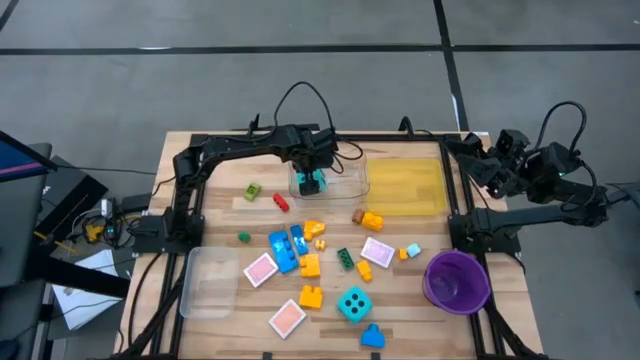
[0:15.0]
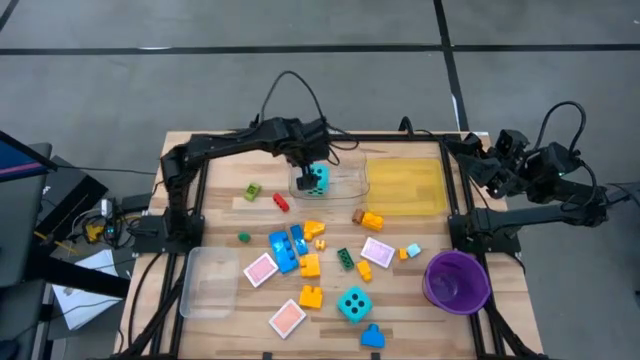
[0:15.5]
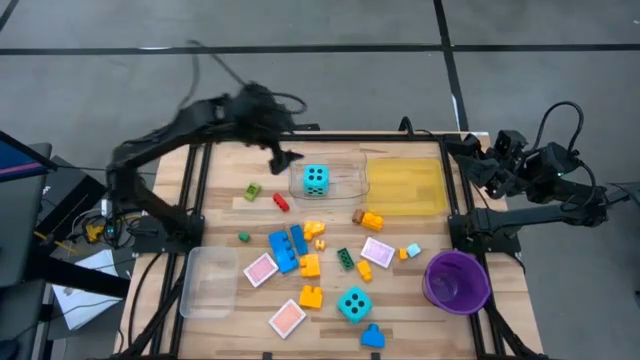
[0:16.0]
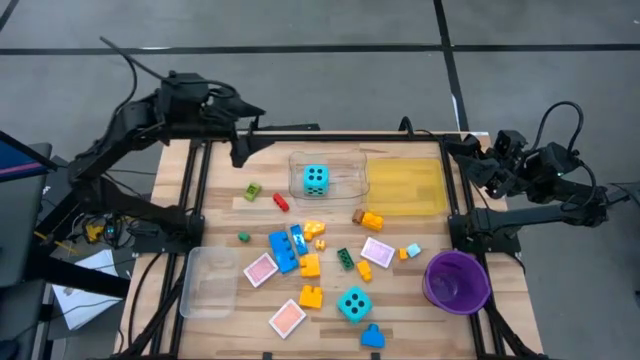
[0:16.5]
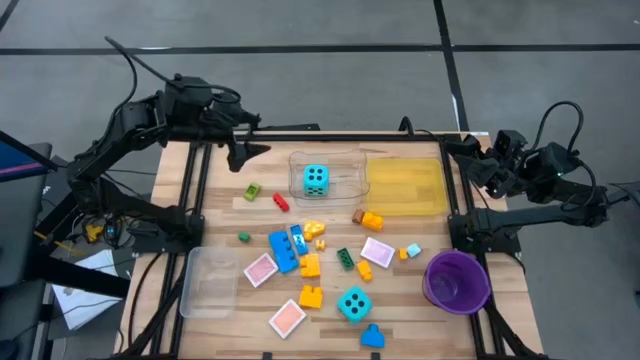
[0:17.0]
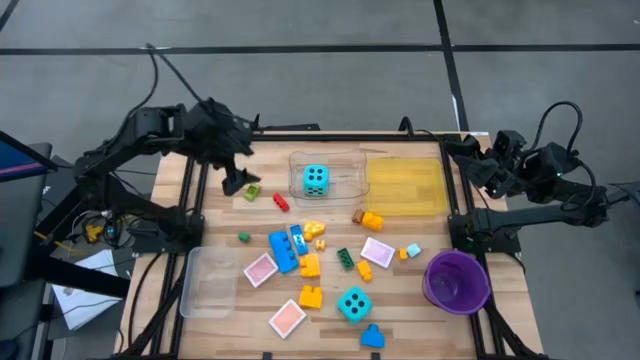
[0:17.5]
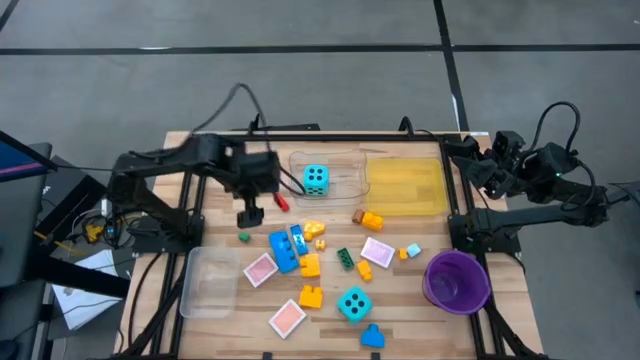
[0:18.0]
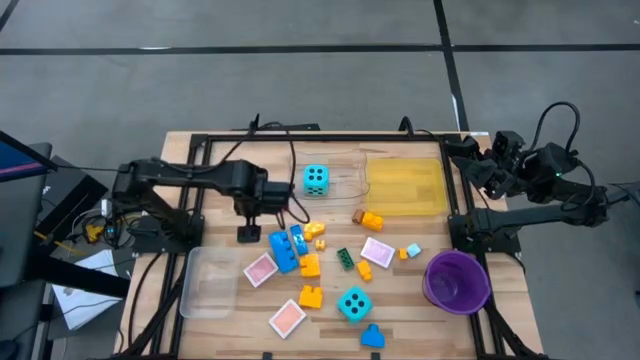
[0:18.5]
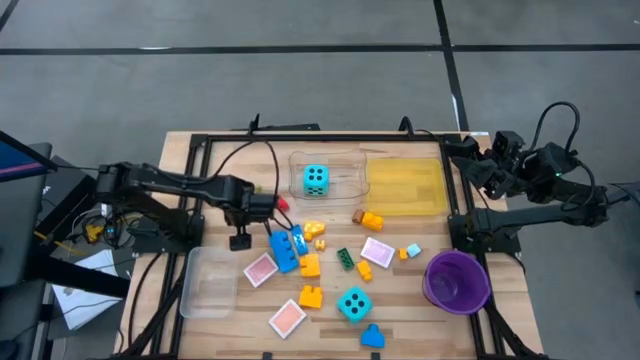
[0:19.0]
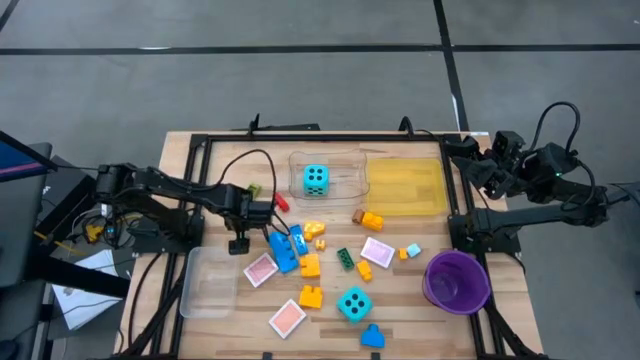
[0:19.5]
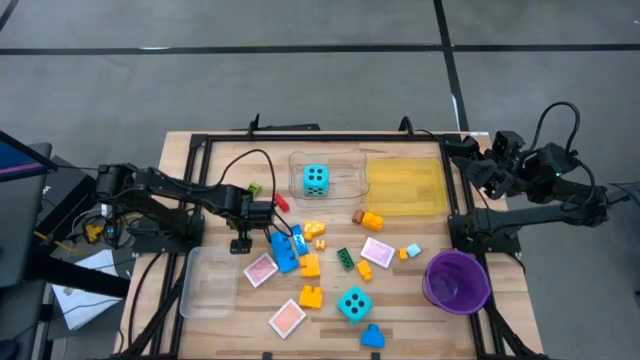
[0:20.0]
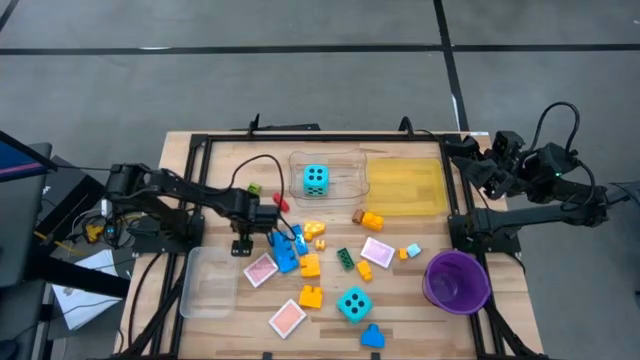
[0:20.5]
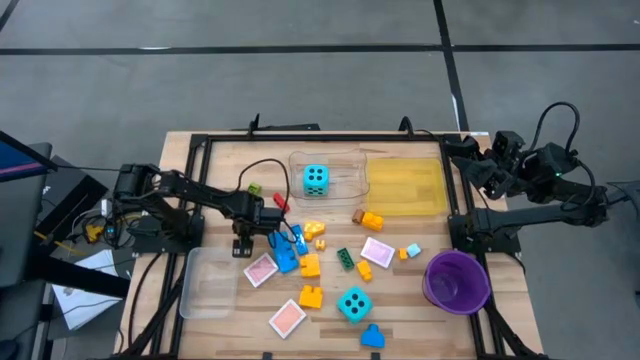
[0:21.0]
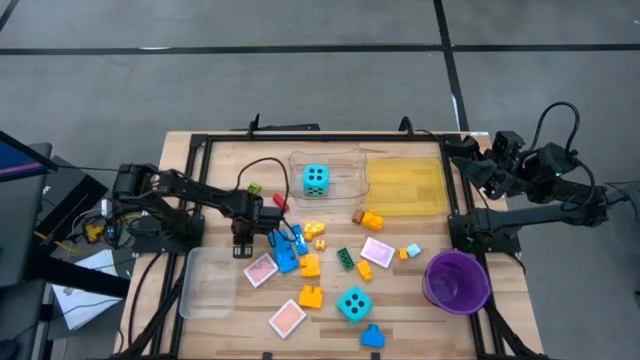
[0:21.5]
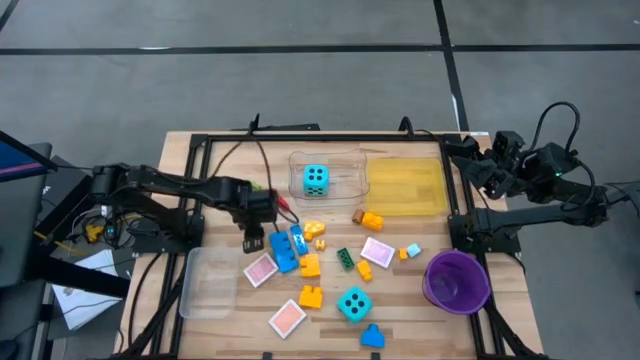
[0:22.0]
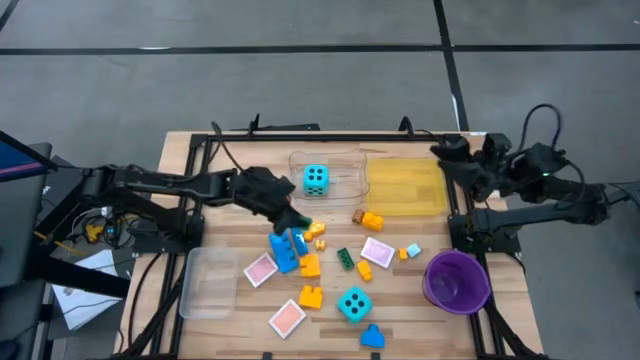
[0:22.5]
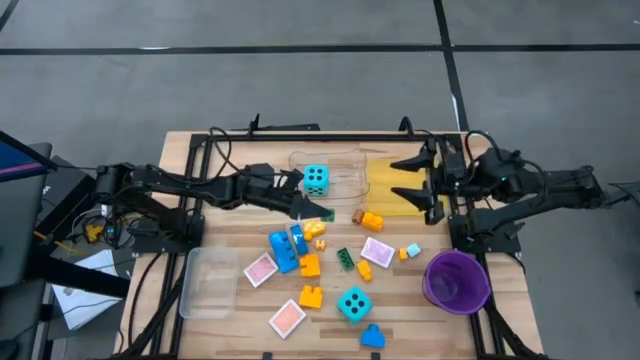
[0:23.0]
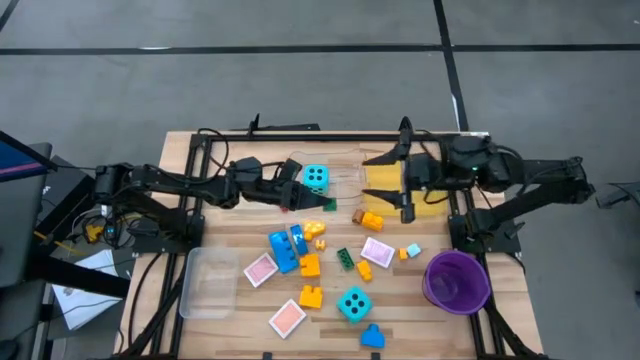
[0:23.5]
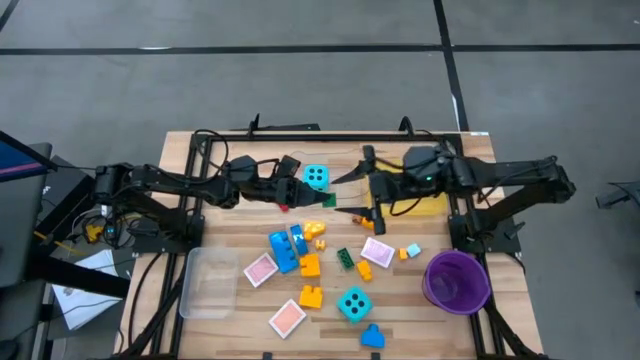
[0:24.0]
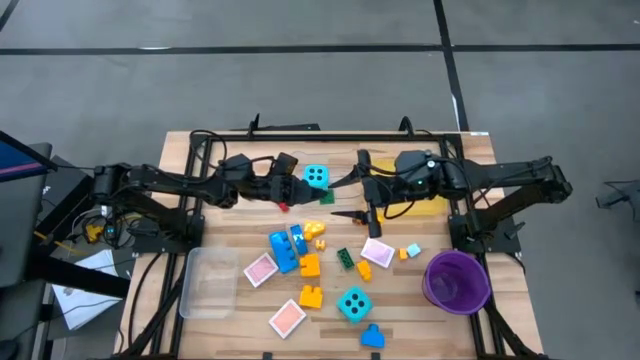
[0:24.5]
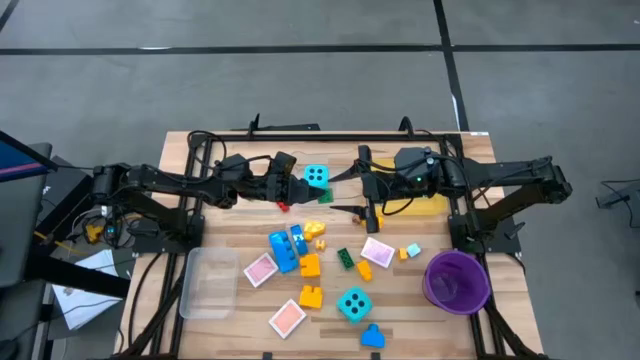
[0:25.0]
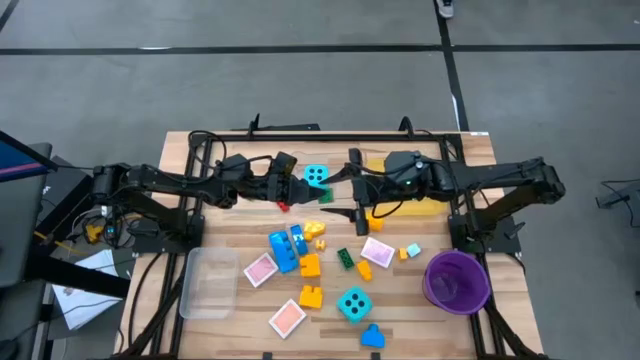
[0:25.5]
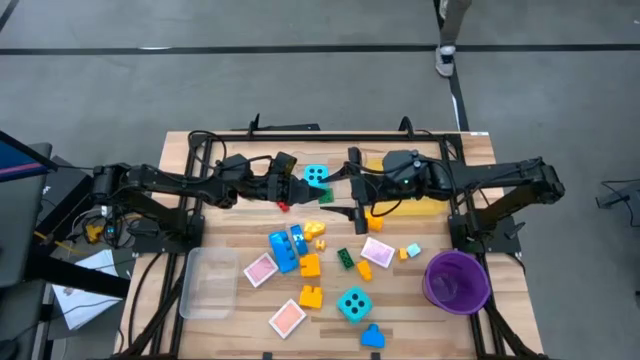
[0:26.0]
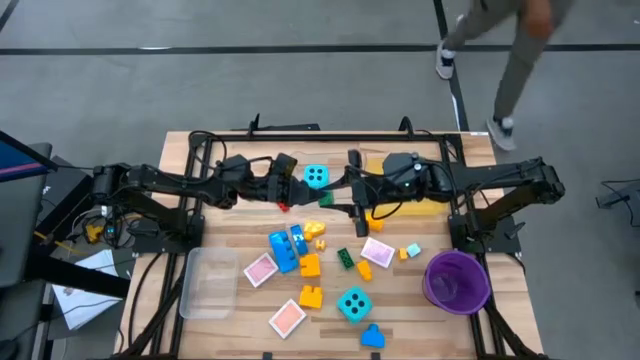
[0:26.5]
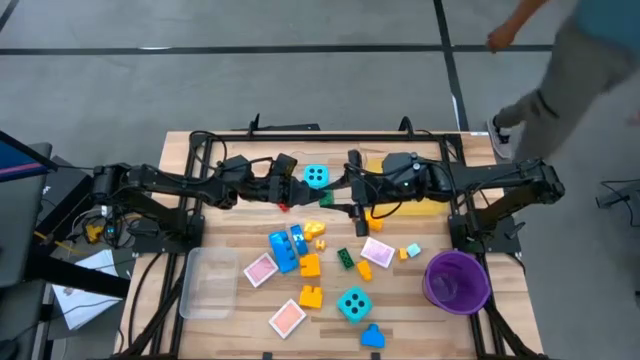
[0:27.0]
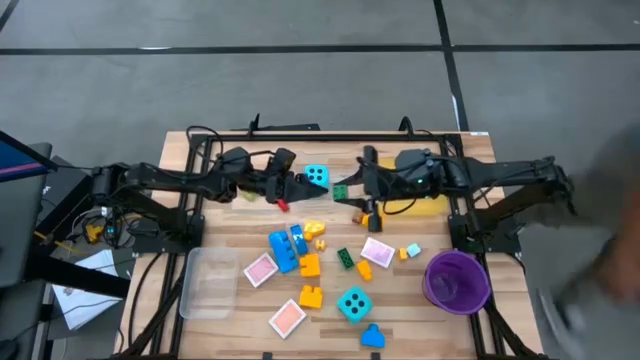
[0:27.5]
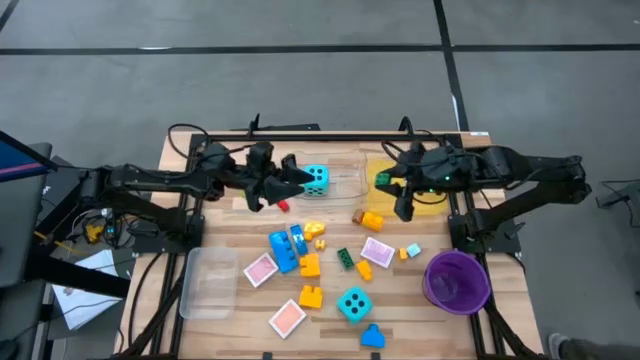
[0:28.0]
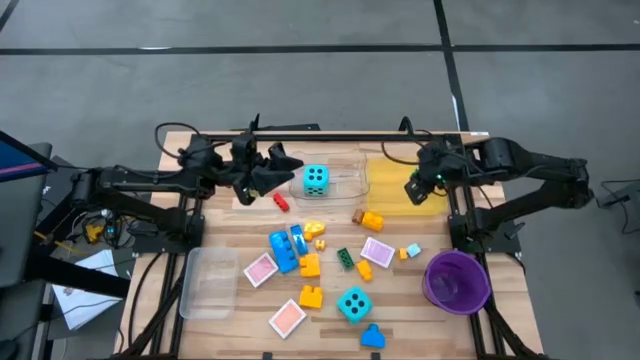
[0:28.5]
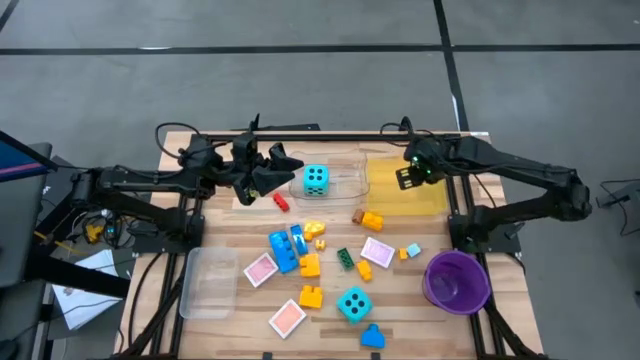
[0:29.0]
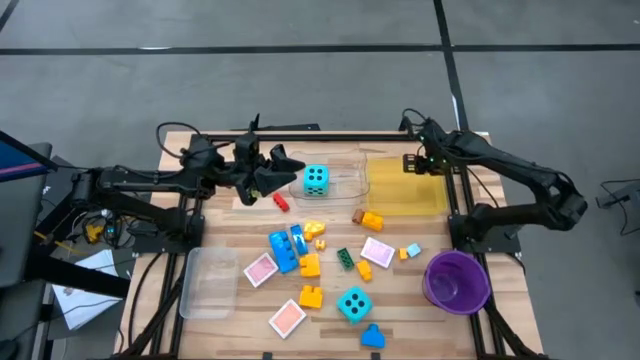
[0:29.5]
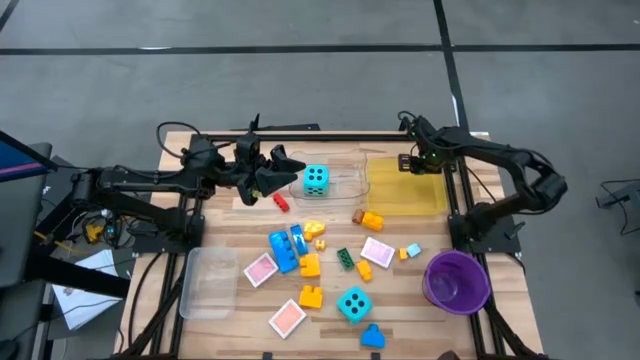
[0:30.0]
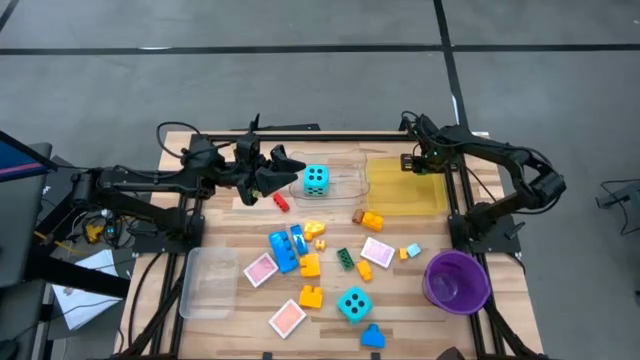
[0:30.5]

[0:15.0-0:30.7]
Task: Pick & Place Toys
Put the green game piece into the yellow bin

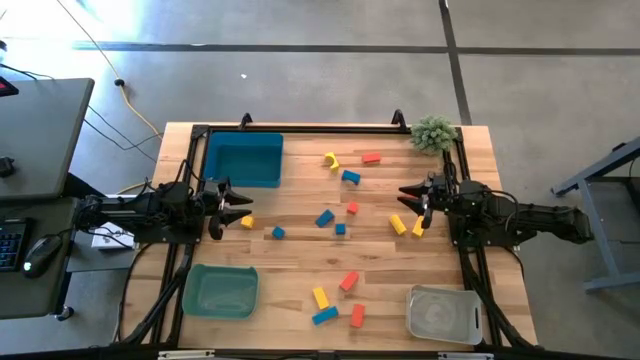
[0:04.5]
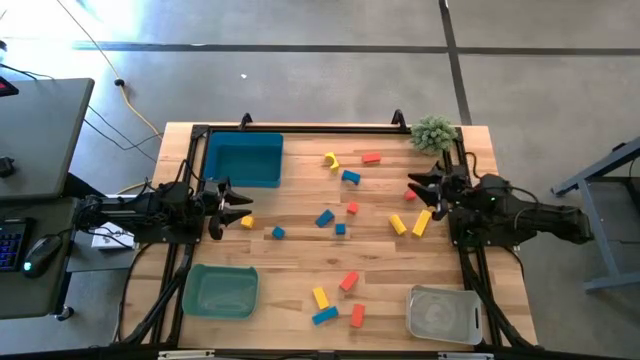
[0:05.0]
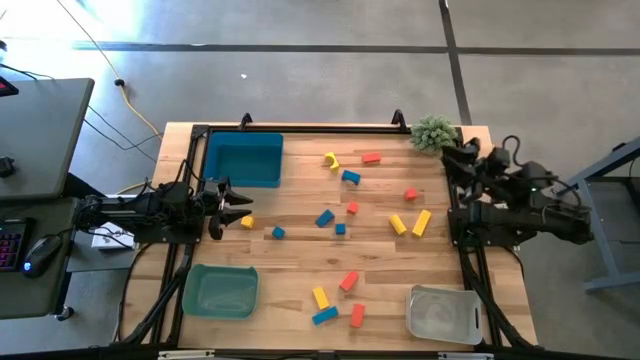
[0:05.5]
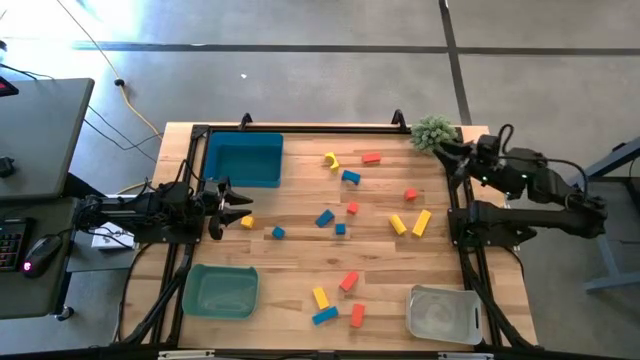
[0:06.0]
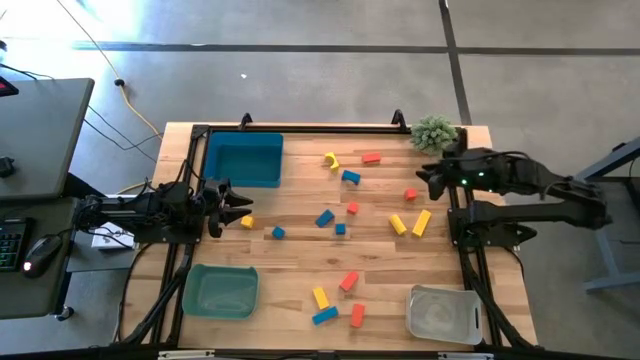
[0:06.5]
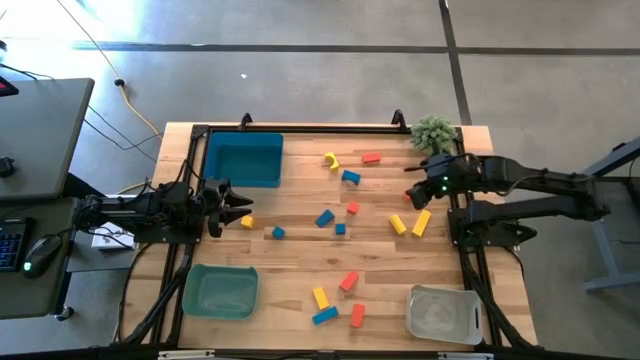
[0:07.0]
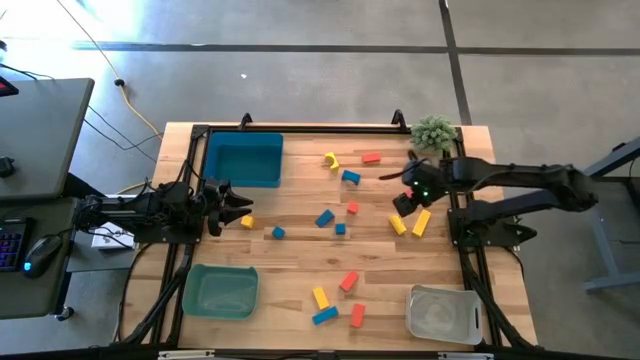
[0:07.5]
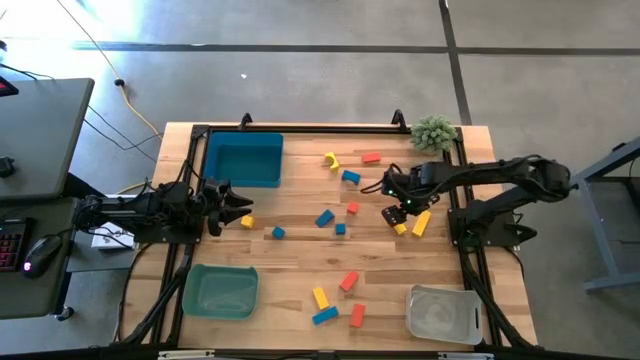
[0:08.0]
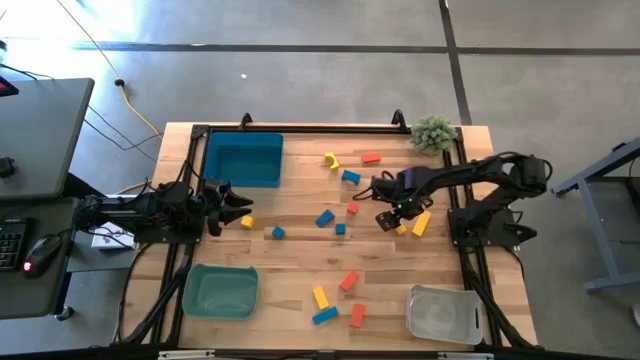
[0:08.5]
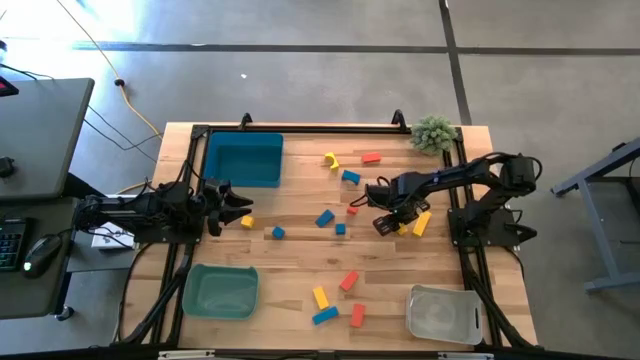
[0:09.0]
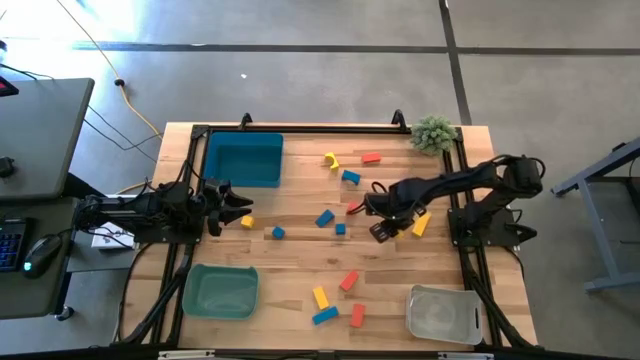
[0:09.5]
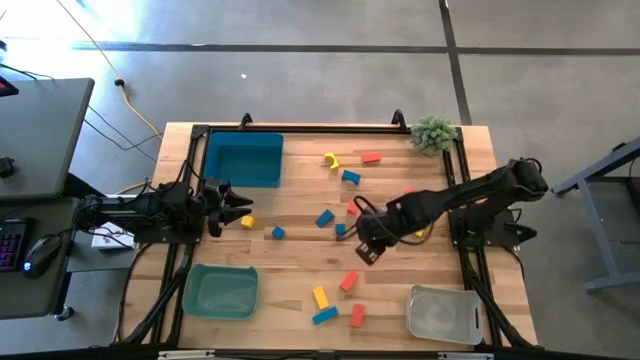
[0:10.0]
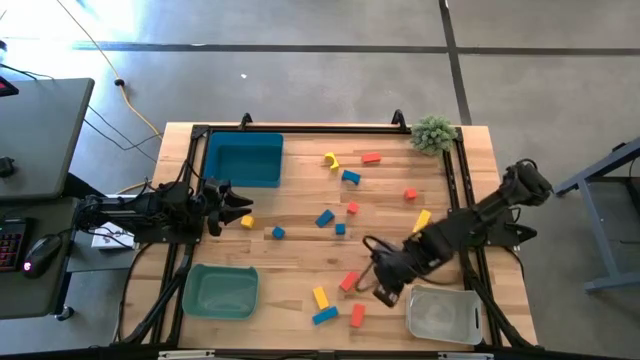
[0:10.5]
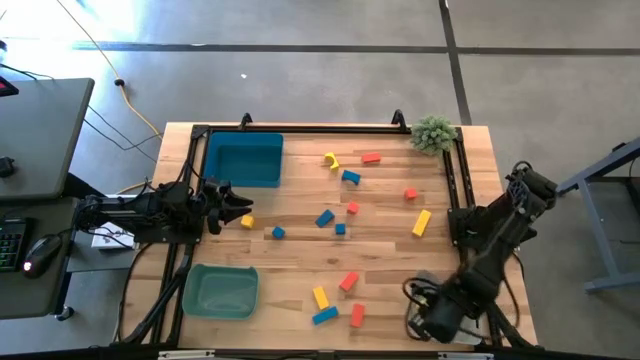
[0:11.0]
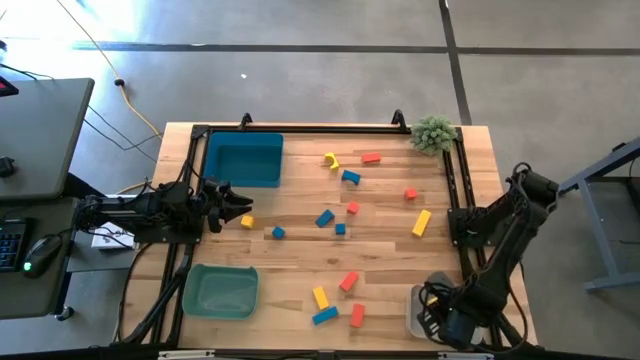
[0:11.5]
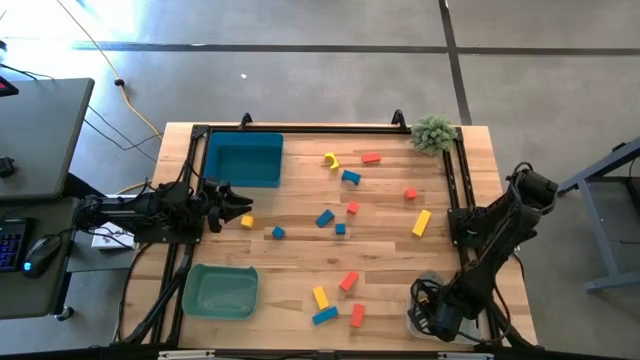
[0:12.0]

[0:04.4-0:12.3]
Task: Sort & place blocks by color
Put the yellow block into the gray bin
